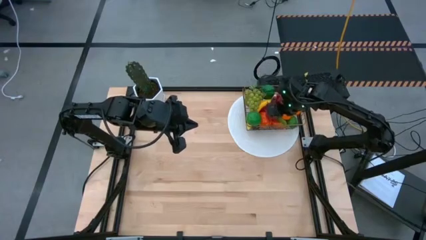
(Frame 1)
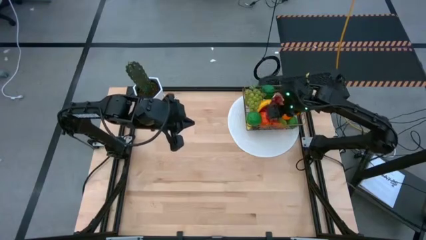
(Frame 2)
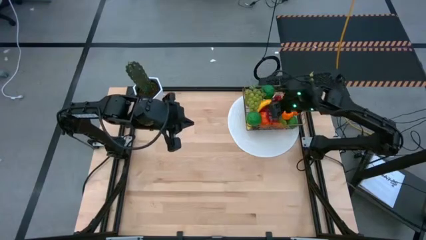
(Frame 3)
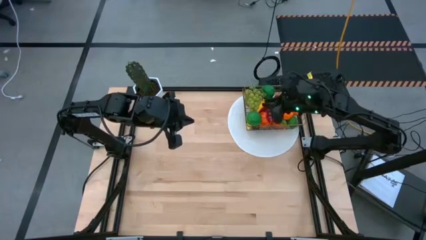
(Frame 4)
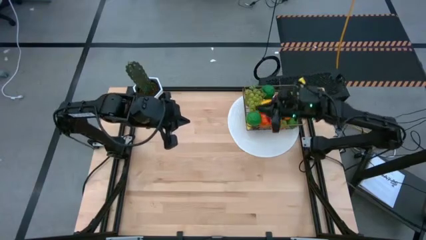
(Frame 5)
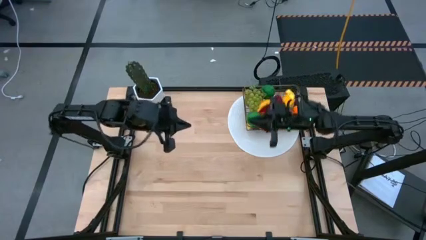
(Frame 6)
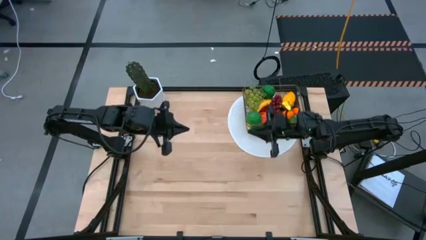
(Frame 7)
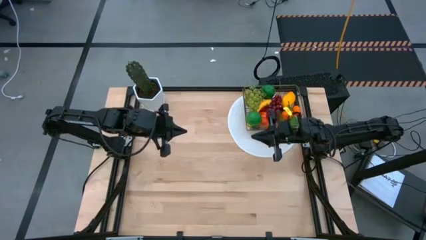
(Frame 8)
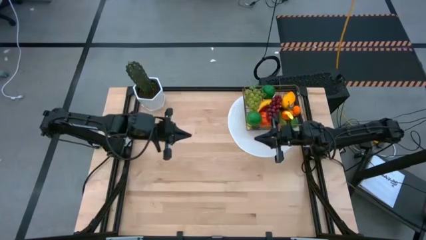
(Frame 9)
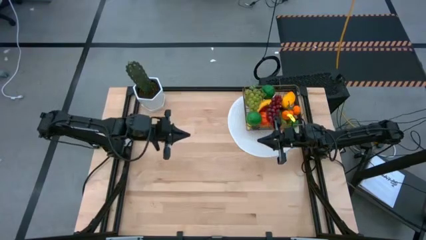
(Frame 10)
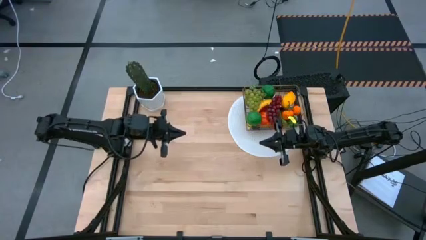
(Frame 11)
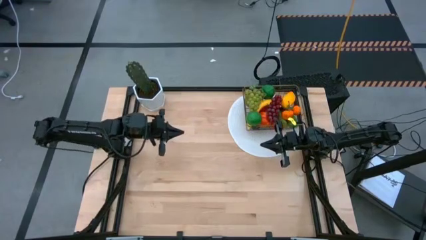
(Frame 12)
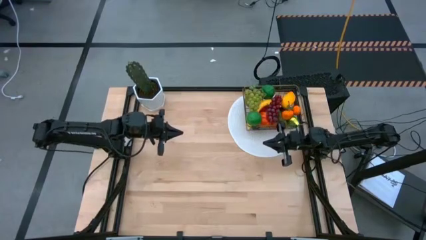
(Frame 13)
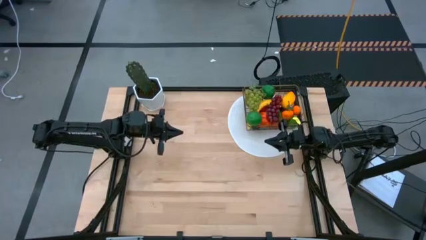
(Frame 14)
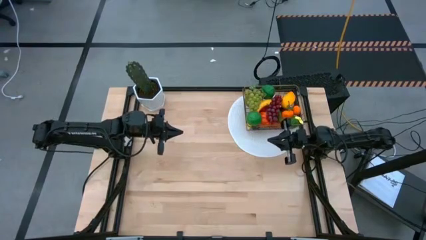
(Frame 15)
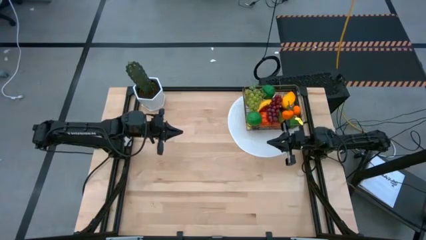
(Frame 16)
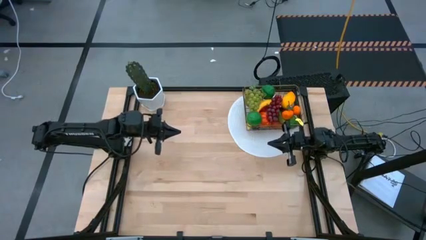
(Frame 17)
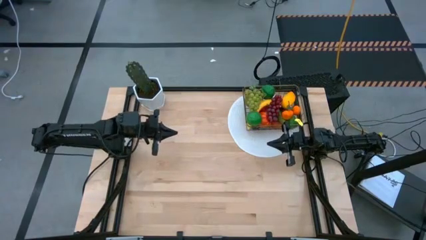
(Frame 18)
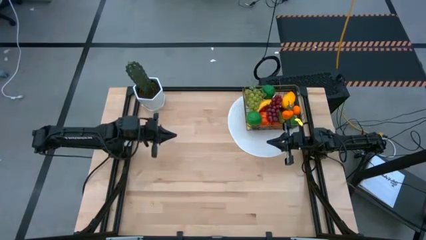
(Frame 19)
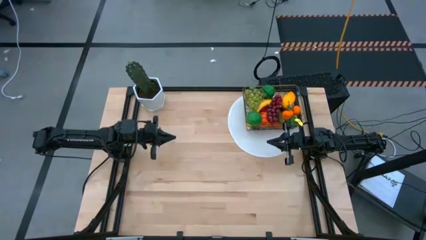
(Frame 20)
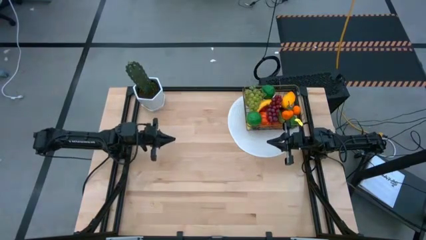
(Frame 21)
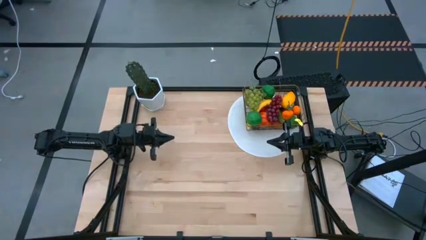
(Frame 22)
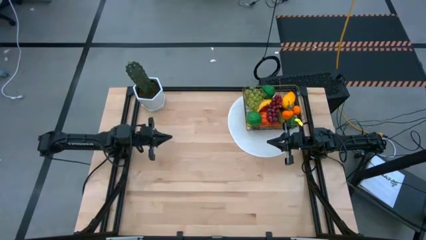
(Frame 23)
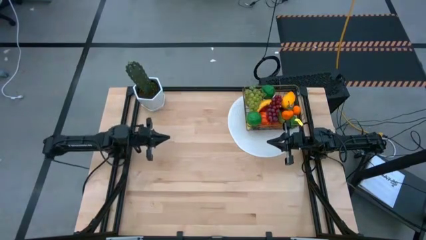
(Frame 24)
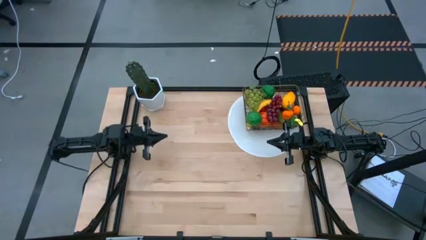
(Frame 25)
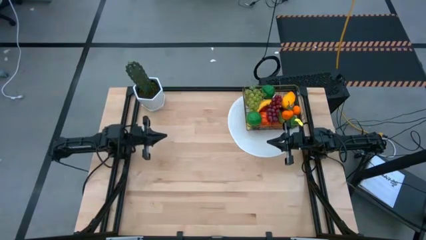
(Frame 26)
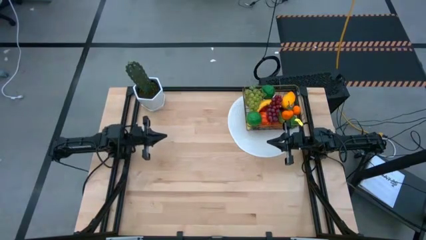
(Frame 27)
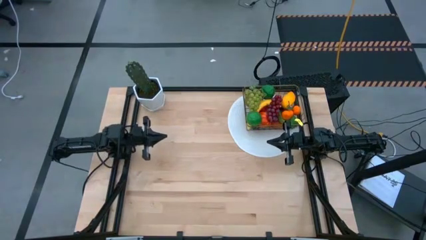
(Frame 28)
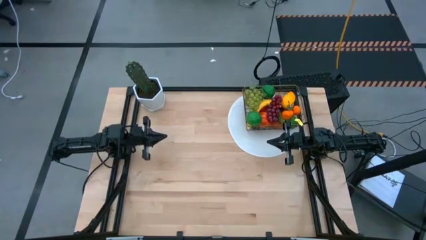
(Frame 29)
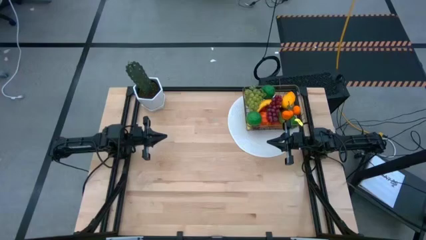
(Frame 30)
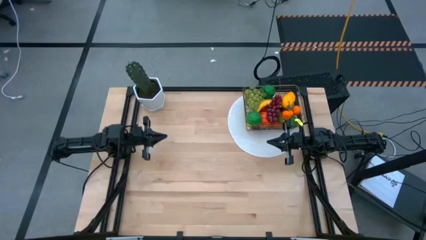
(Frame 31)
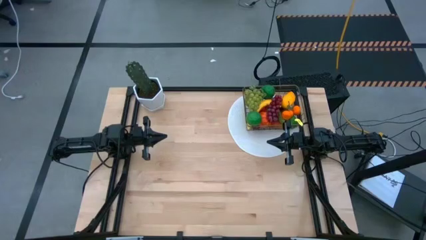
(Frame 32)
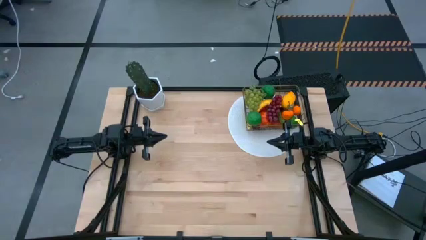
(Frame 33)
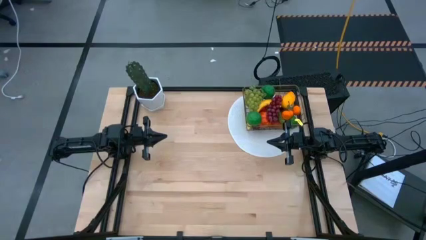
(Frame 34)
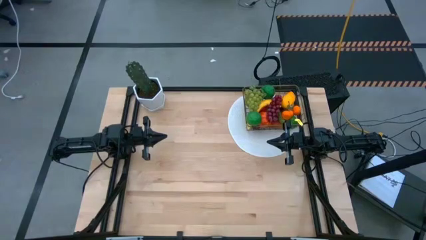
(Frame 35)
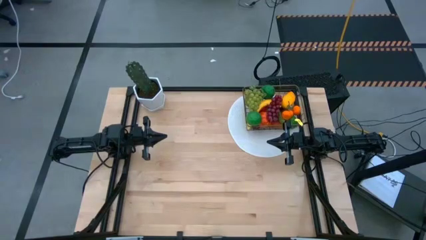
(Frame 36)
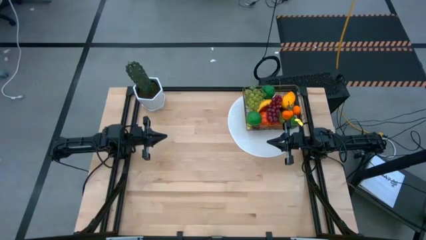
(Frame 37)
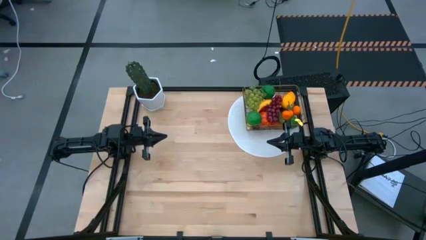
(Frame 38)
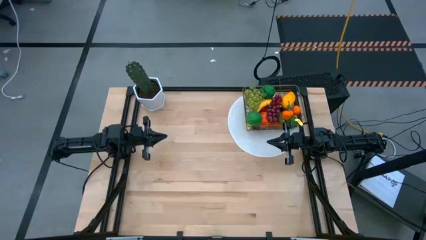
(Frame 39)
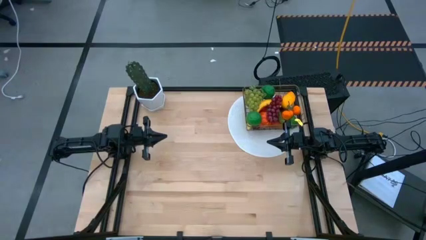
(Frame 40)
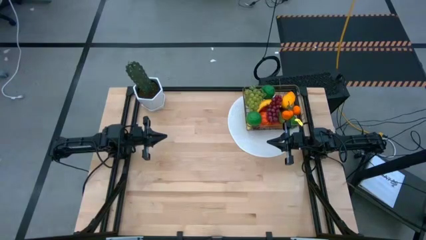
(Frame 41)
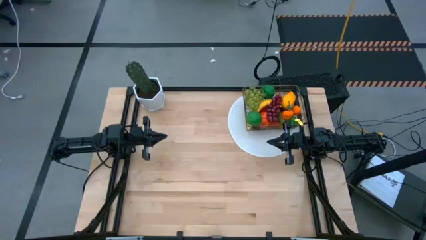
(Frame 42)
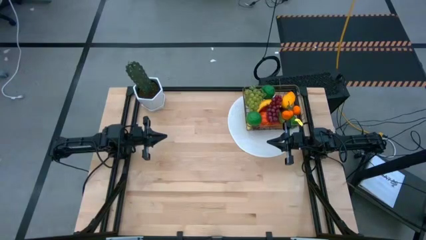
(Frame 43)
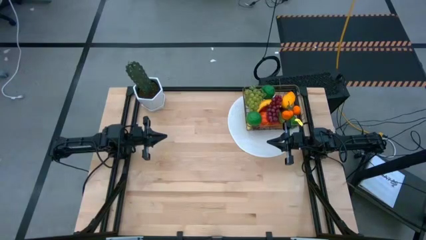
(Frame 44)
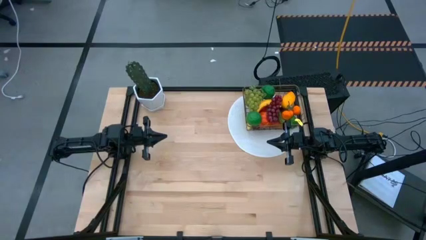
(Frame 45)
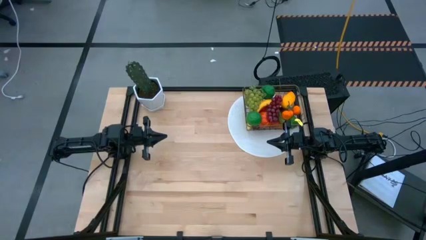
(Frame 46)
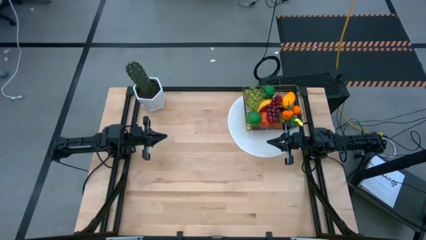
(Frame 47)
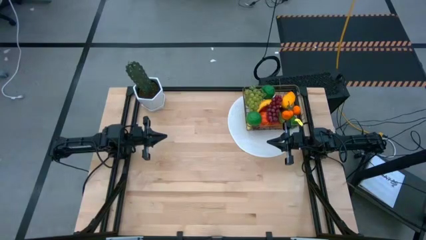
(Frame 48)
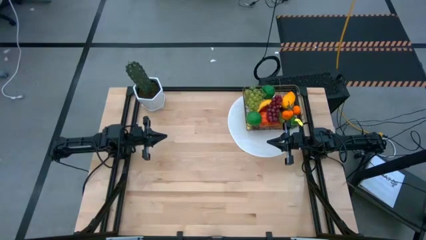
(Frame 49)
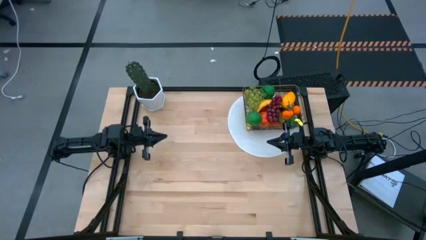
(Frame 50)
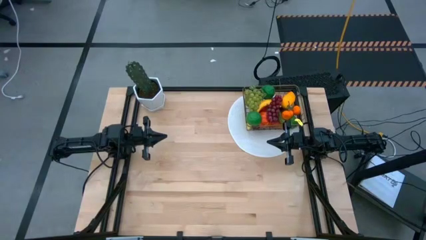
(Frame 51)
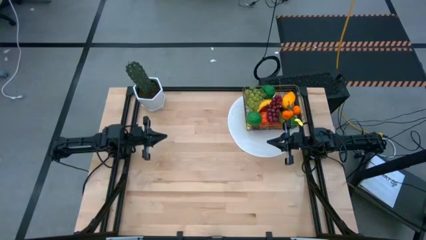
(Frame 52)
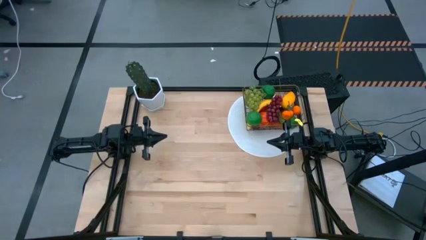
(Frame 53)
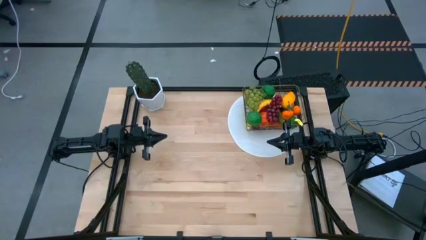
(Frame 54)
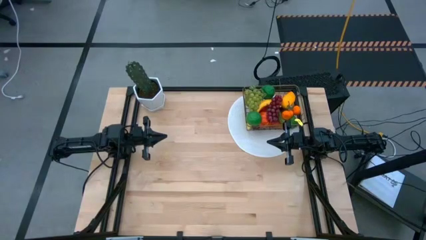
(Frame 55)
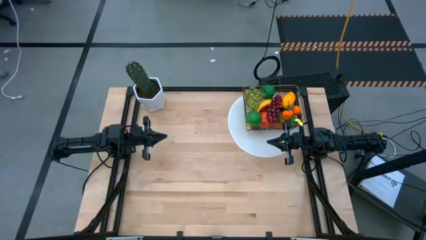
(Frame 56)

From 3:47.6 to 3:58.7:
Task: Build produce basket
Return to Home Position

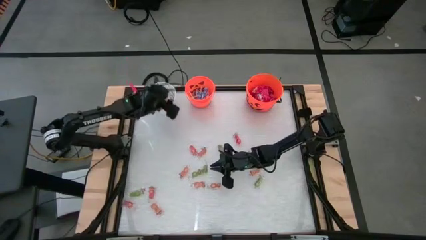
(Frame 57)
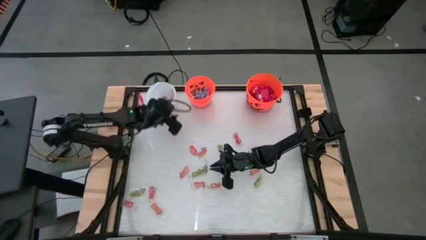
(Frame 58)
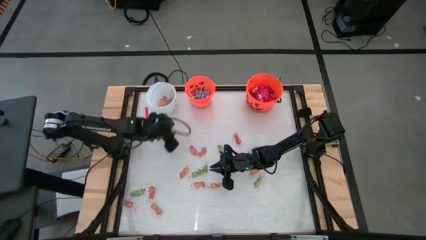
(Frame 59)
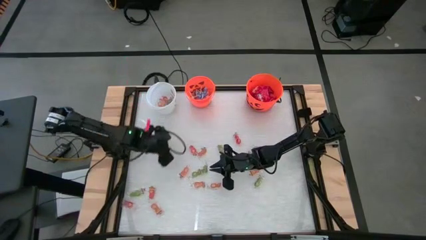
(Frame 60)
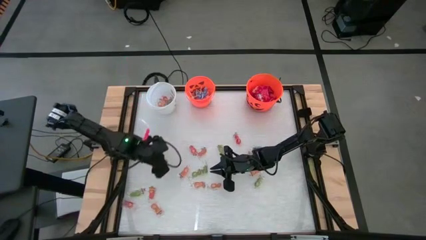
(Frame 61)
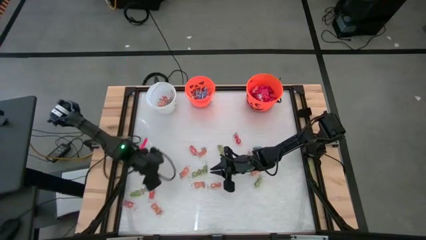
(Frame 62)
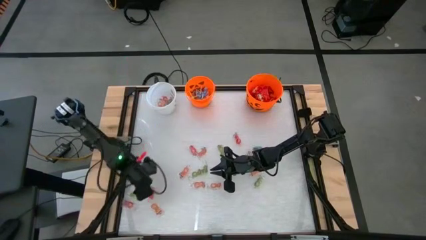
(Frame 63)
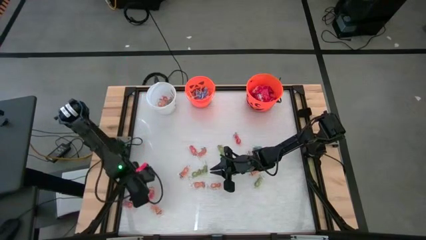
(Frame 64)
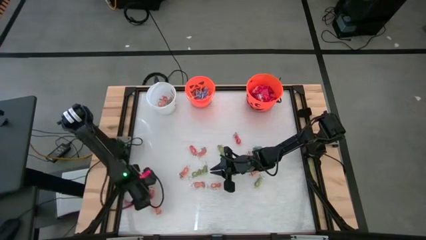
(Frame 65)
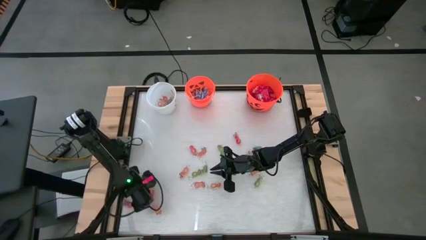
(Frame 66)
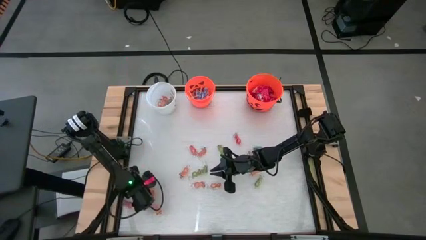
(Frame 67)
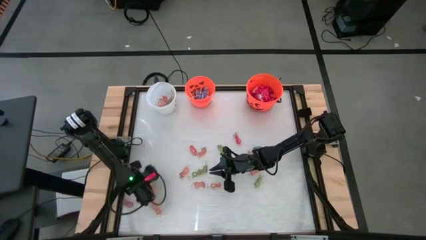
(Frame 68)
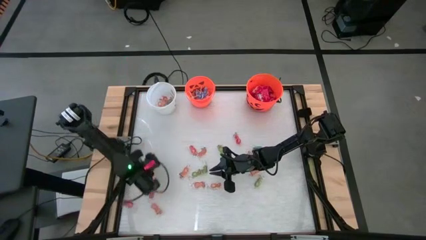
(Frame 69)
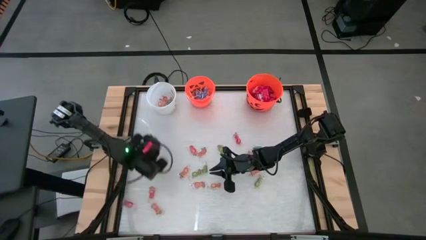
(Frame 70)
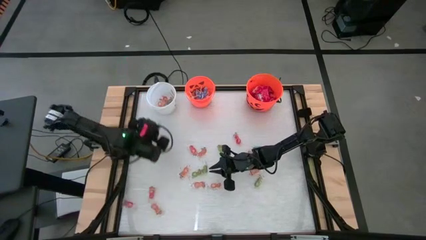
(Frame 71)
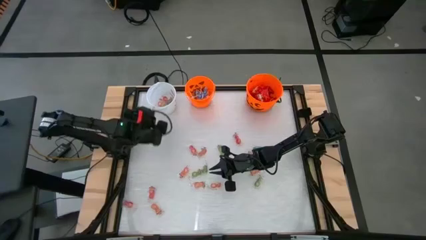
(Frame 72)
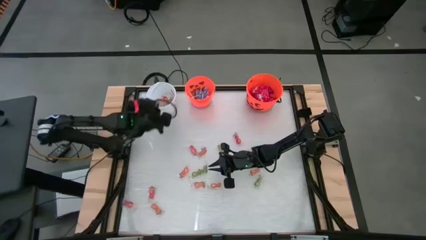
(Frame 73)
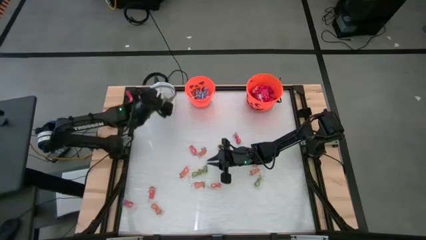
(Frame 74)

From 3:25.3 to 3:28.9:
Task: Sort candy by brand, put in halloween buckets
Put the green gummy into the white bucket

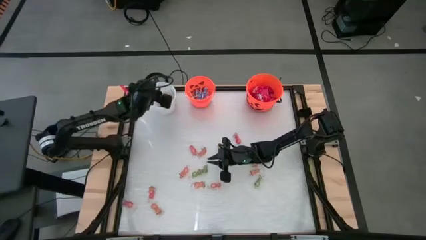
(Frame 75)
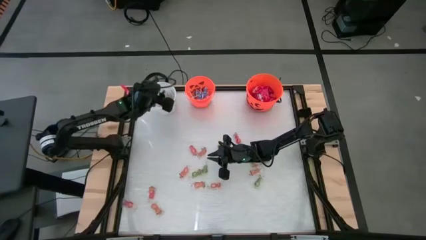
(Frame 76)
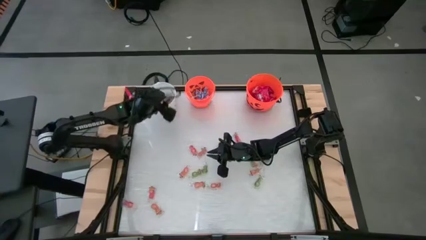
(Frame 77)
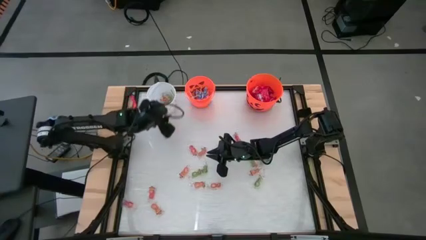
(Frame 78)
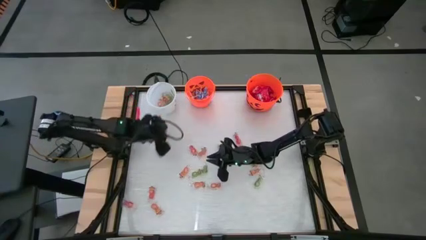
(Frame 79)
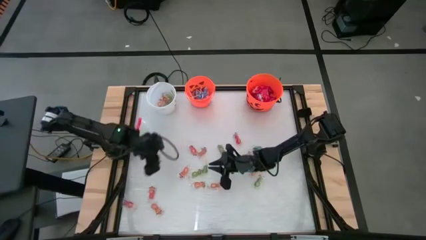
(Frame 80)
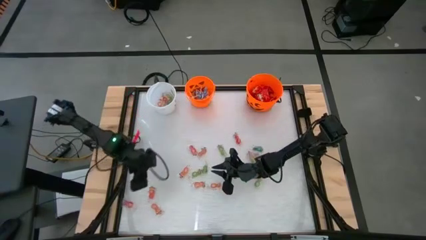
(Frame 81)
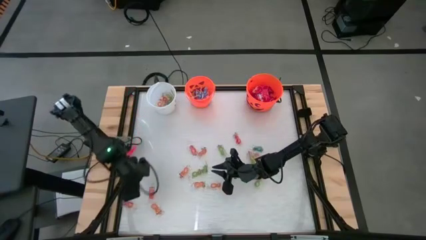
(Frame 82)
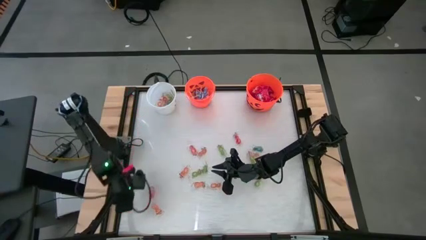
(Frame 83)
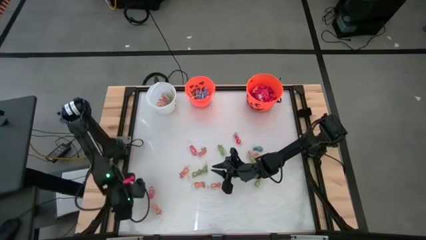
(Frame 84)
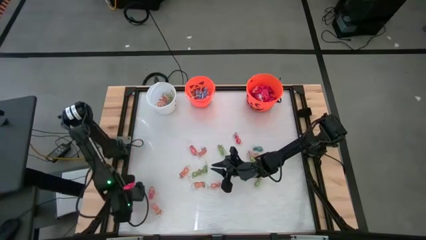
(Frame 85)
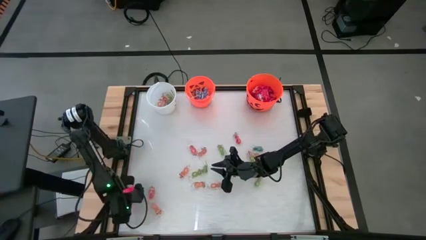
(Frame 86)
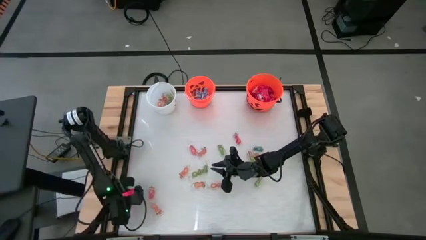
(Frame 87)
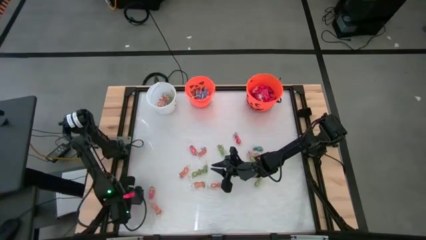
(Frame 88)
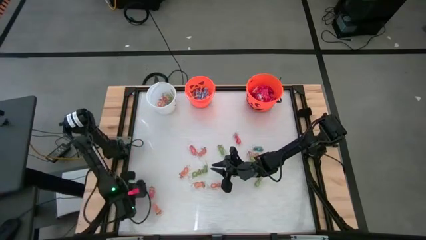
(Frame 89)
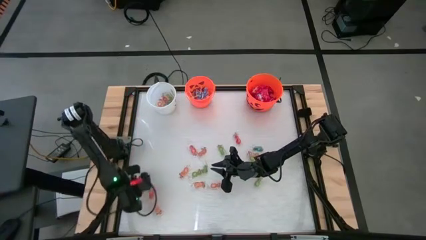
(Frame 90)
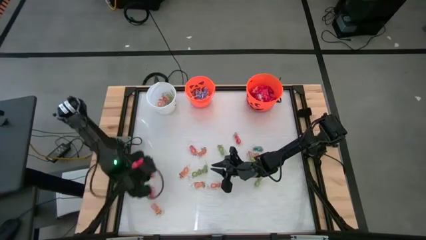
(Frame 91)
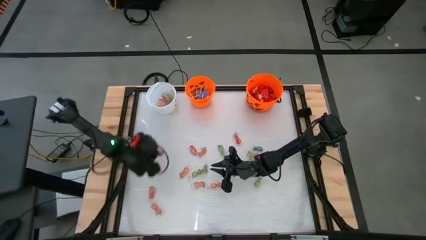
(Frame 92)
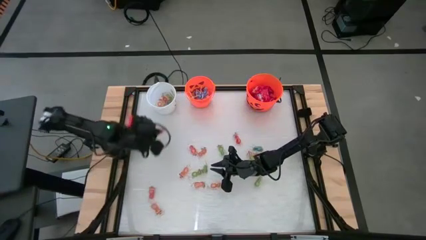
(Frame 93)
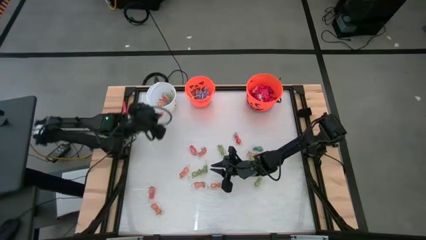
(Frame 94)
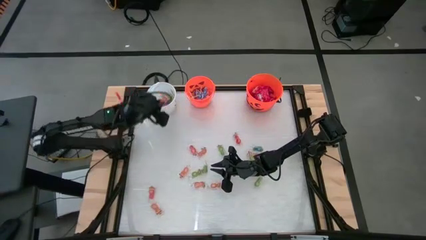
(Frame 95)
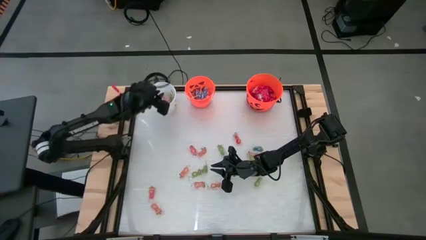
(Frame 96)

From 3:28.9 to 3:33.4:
Put the red gummy into the white bucket
